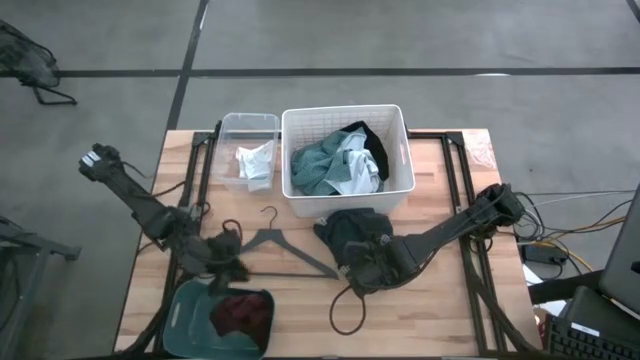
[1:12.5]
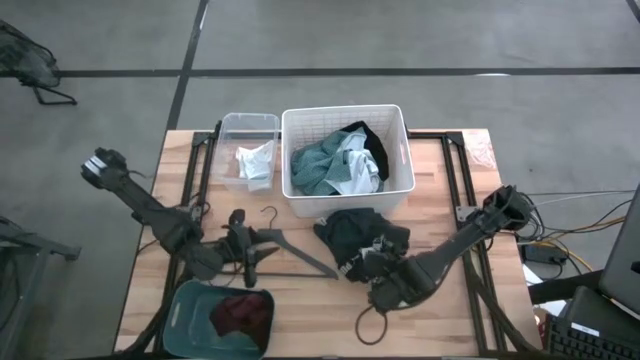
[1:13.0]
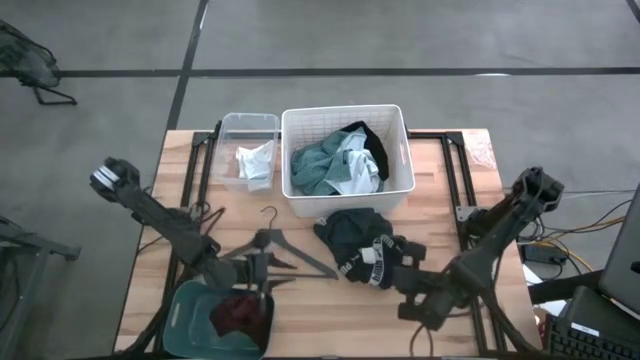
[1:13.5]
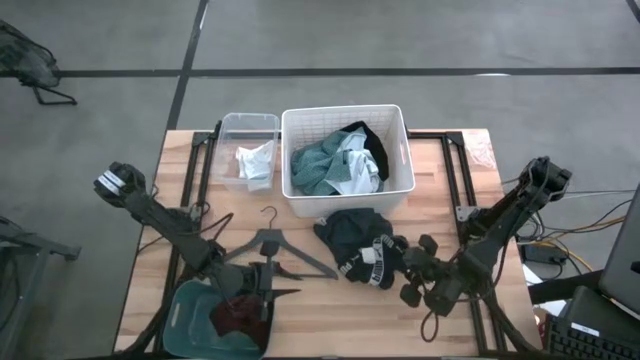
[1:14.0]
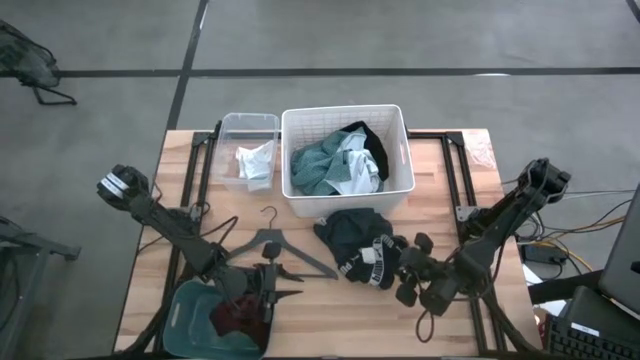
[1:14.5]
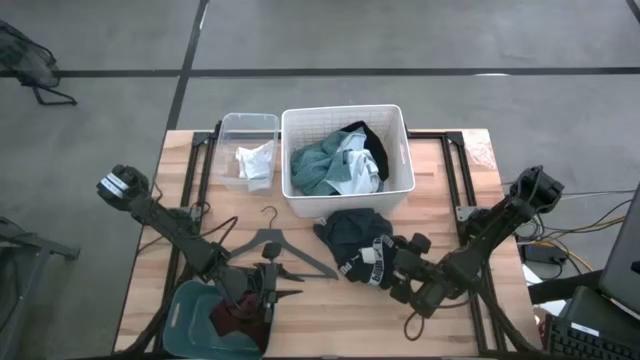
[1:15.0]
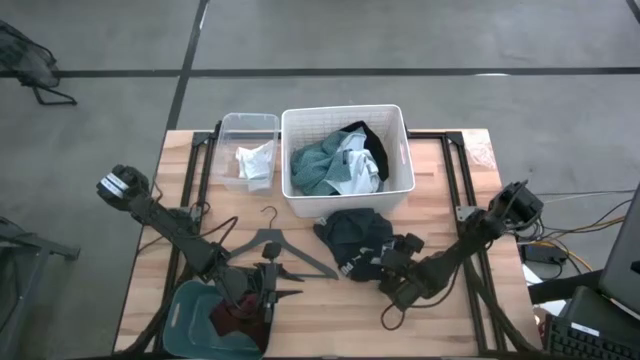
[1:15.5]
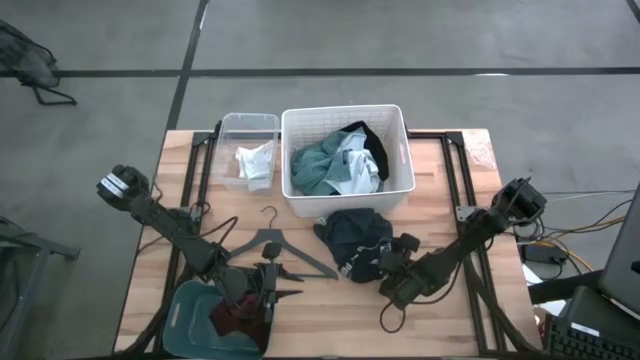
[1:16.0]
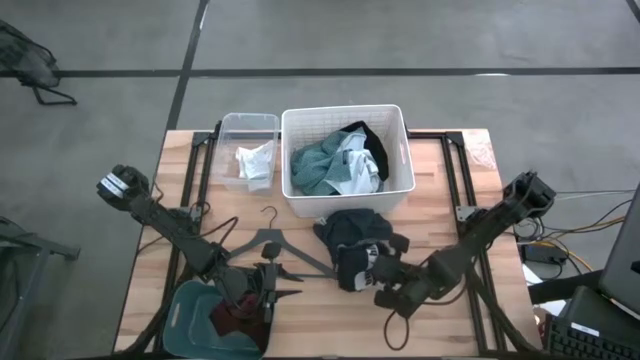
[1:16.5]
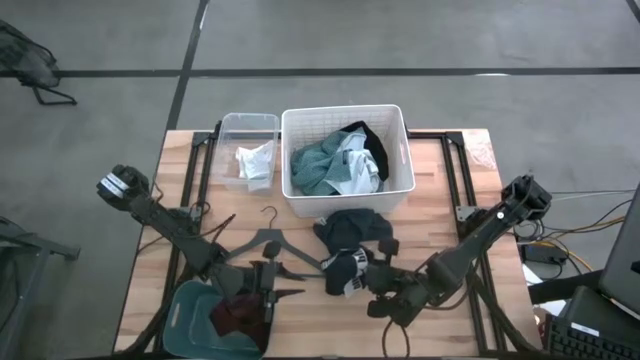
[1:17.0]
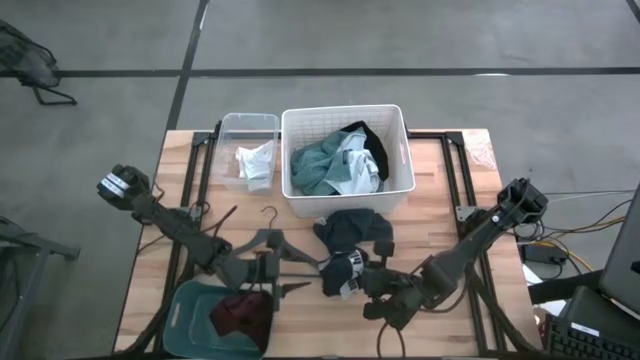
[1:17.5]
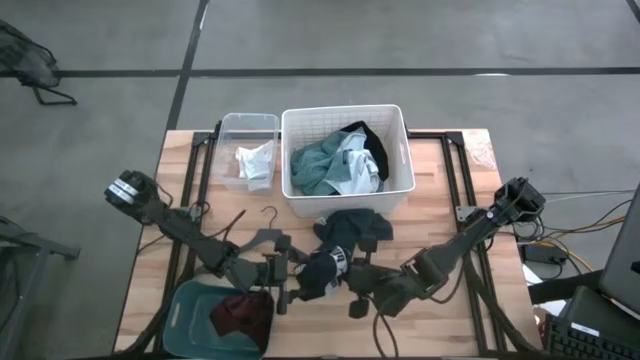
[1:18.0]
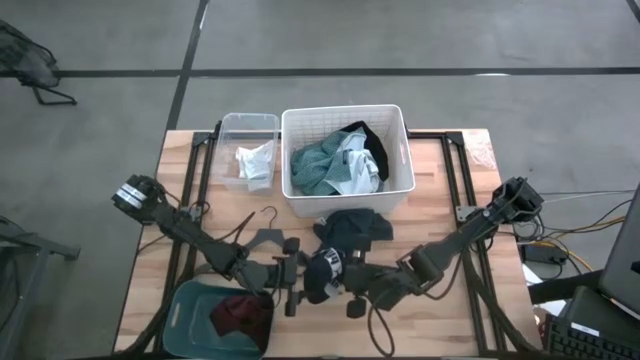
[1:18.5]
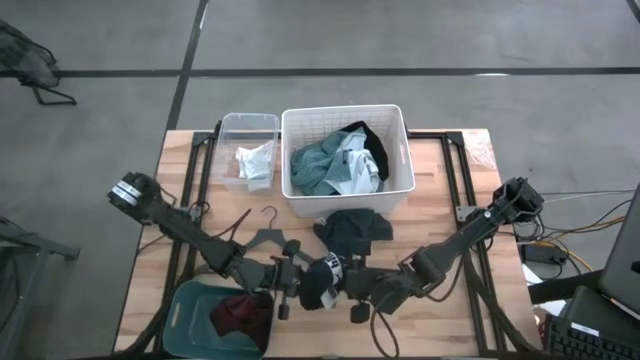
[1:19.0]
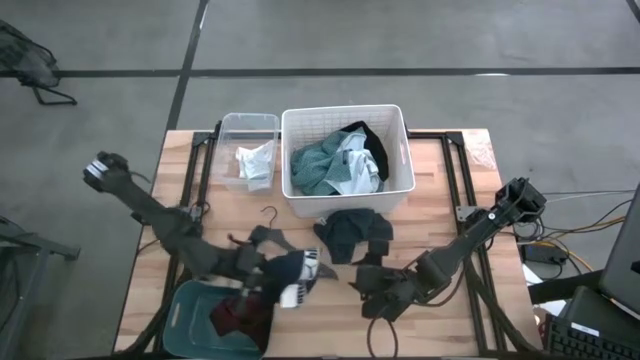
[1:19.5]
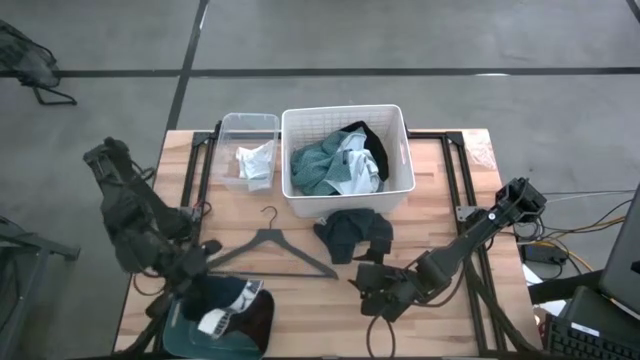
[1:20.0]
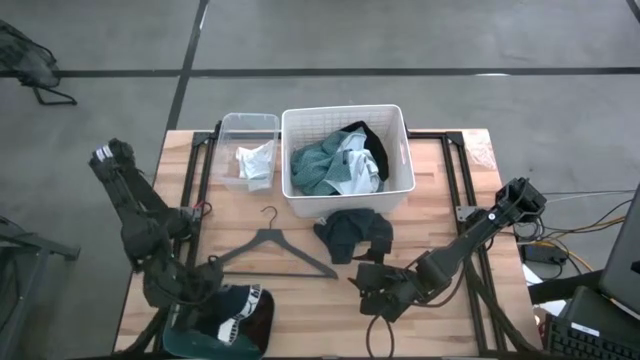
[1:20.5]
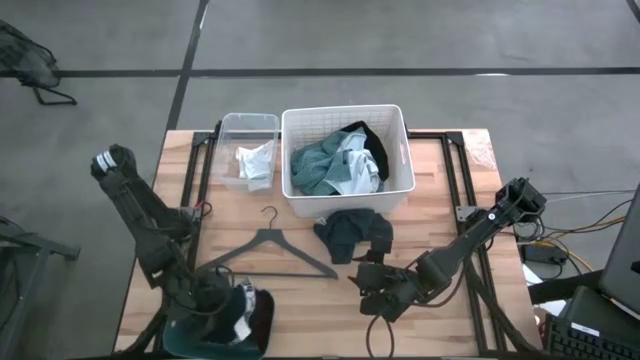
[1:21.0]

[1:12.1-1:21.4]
Task: Pick & Place Cloths
Put the black boxers into the gray bin

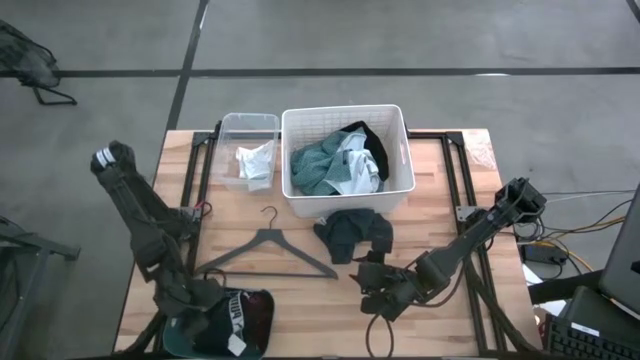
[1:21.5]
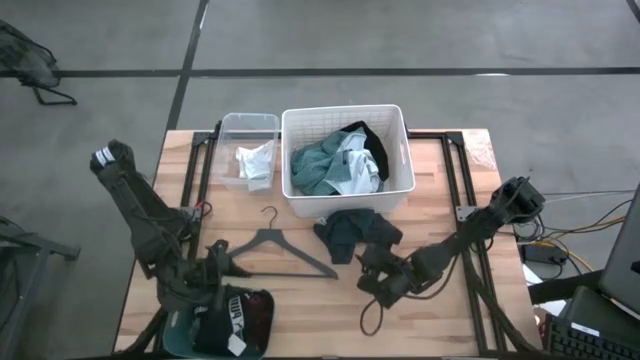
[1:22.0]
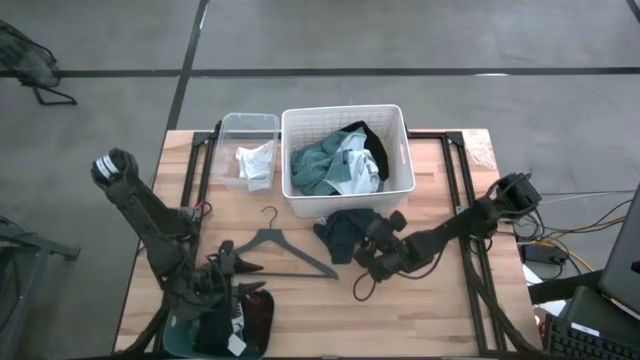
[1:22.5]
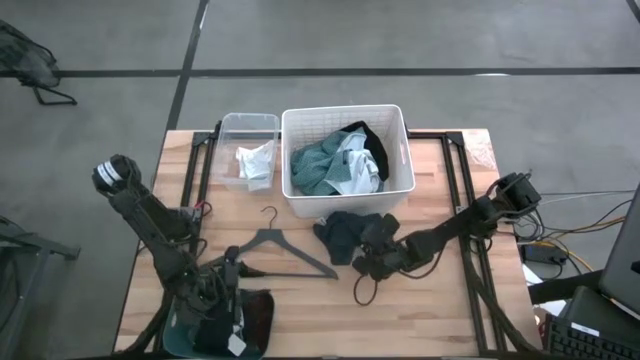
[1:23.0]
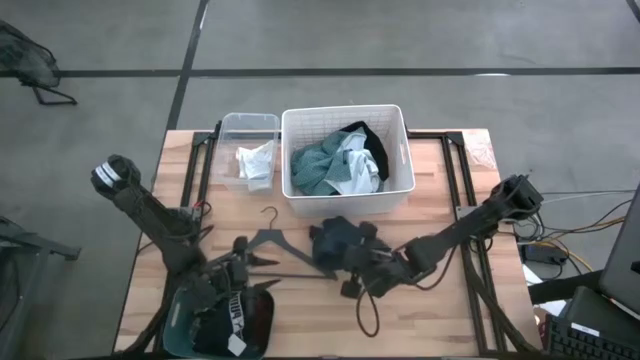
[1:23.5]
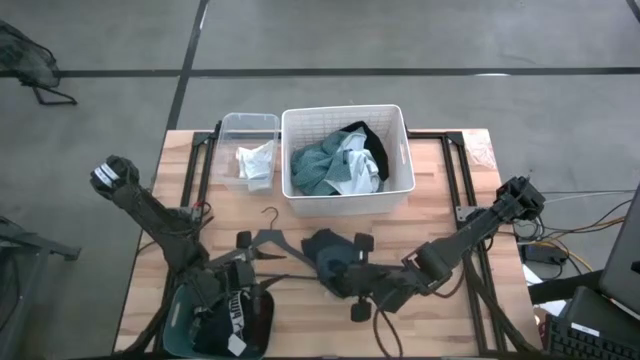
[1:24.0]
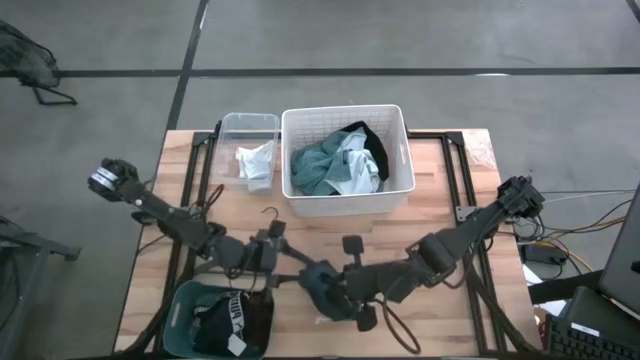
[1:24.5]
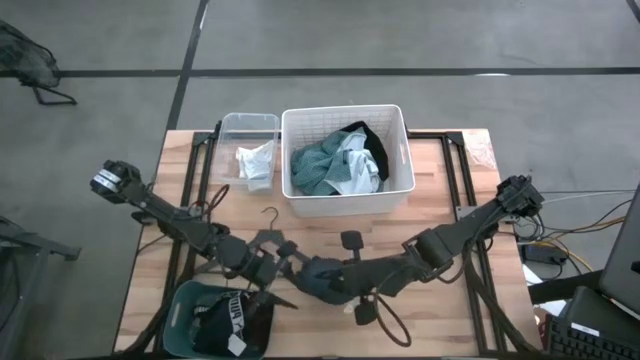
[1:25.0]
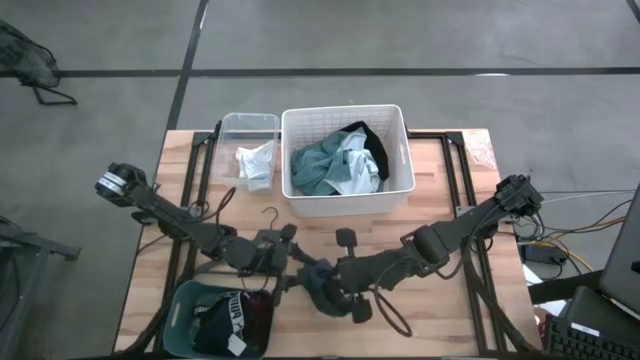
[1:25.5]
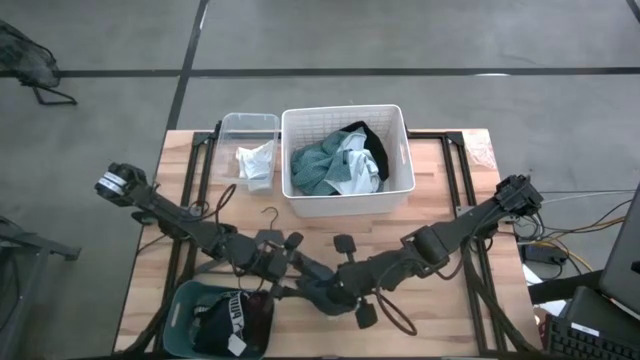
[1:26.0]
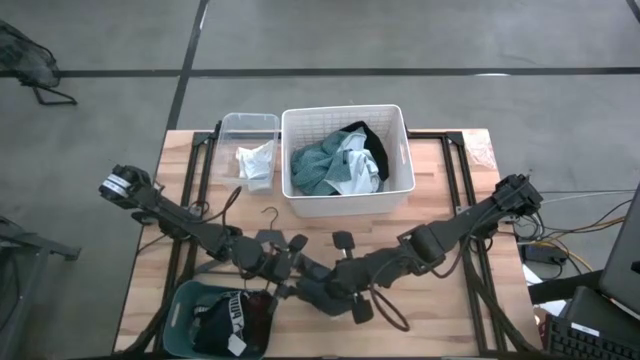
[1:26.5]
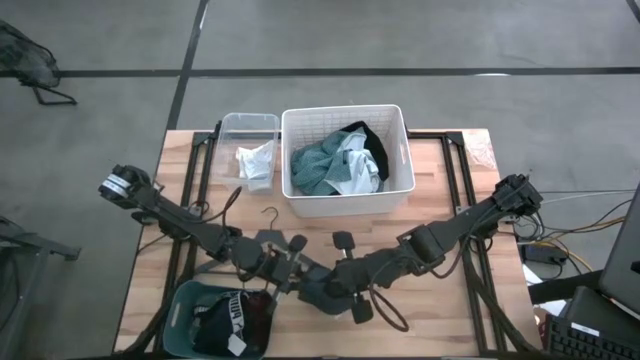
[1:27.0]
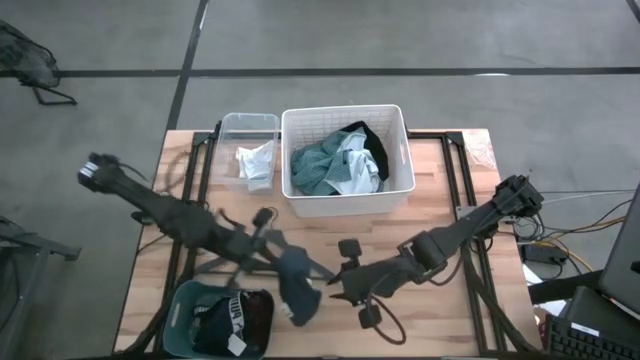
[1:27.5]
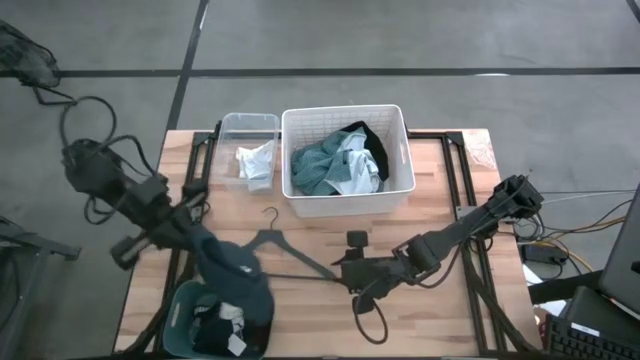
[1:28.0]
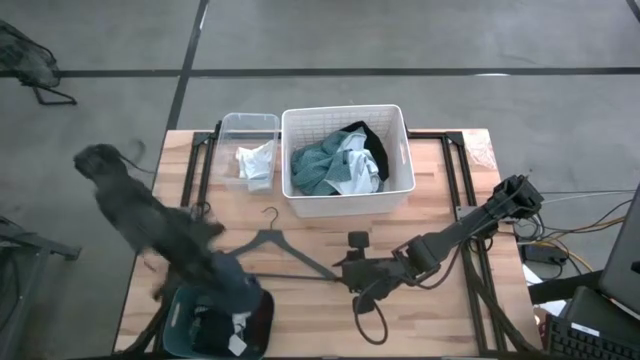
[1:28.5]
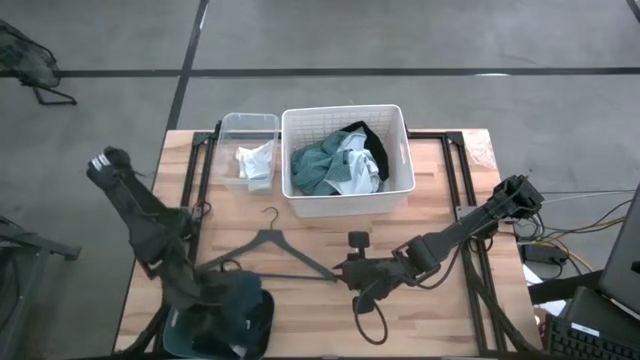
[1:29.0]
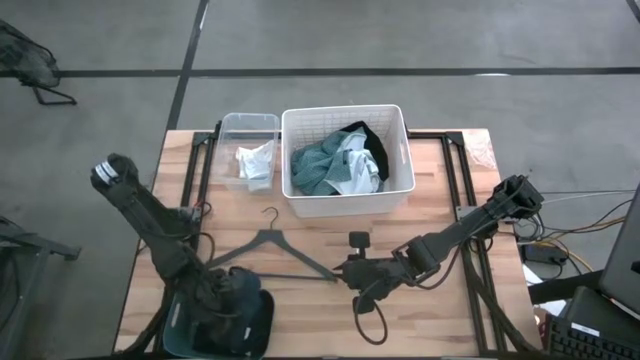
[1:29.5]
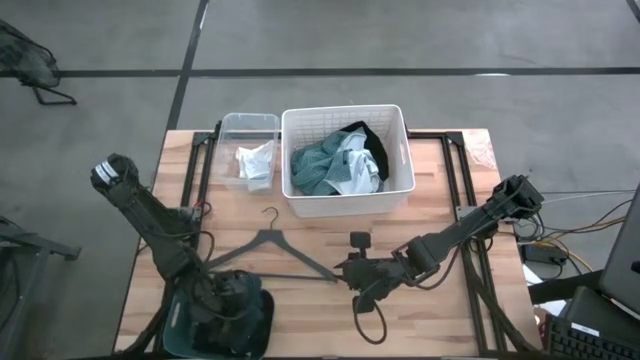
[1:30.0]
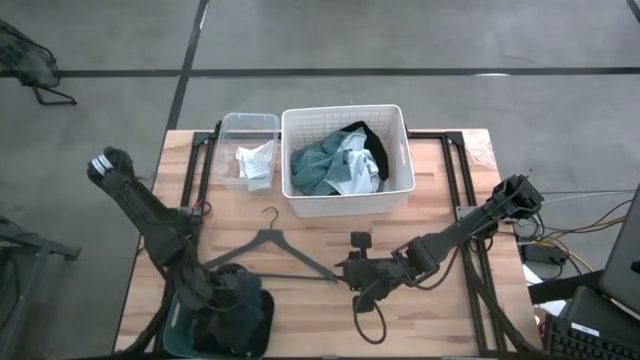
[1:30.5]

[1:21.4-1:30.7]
Put the gray shorts into the gray bin

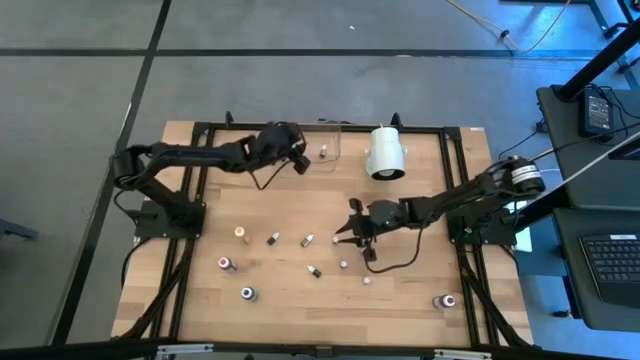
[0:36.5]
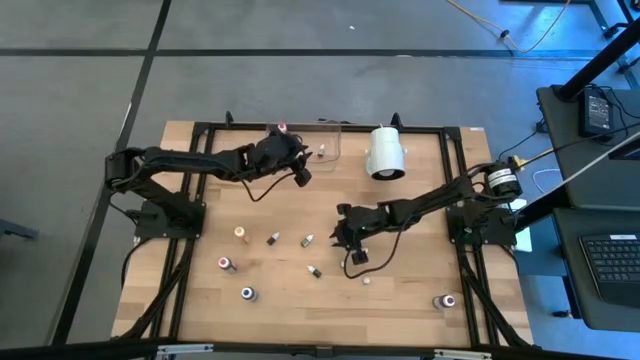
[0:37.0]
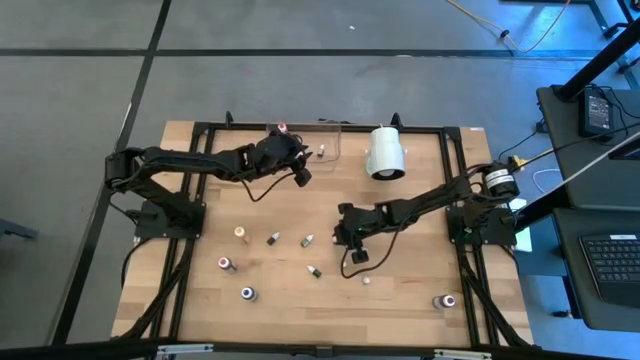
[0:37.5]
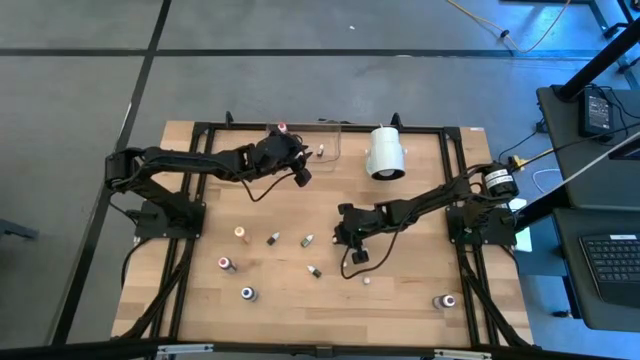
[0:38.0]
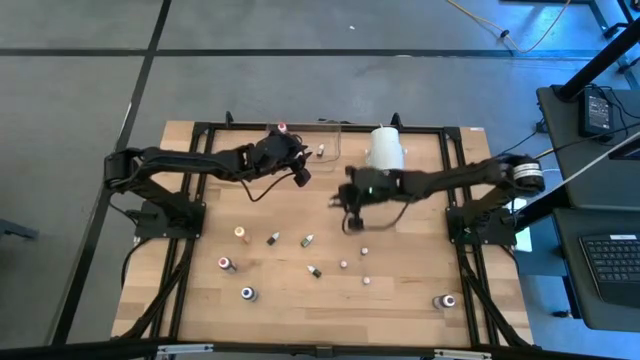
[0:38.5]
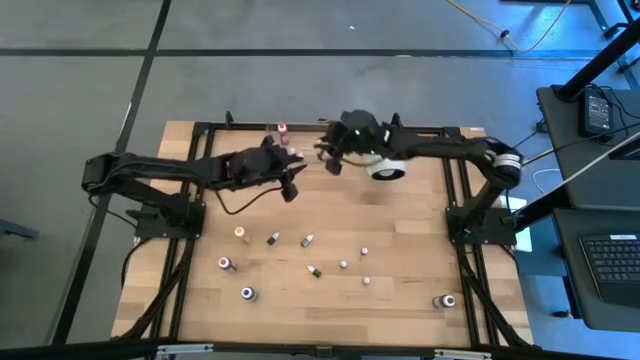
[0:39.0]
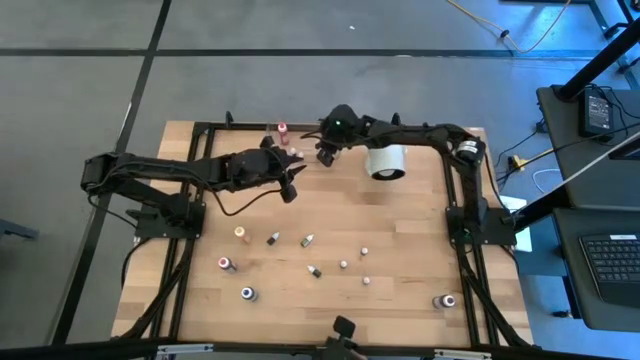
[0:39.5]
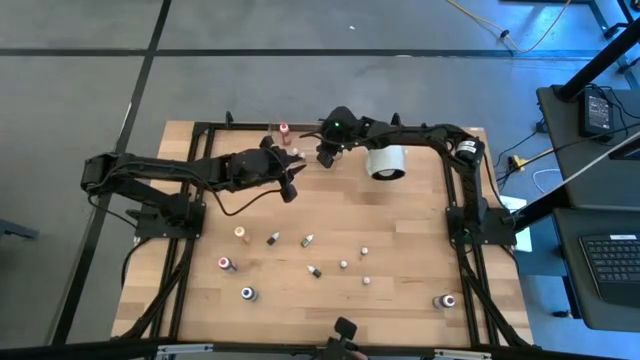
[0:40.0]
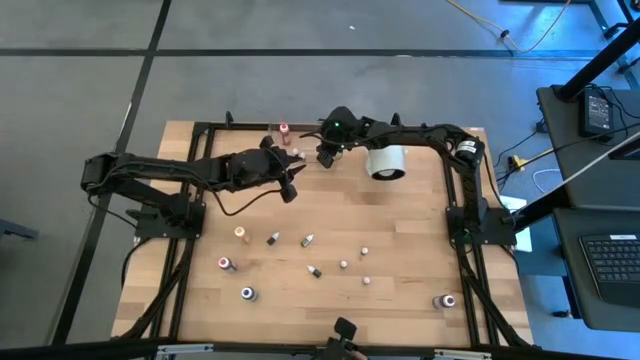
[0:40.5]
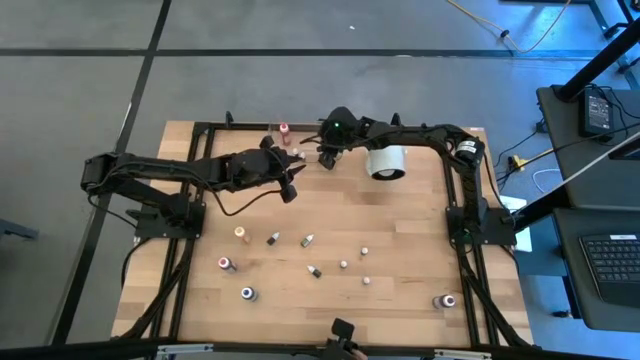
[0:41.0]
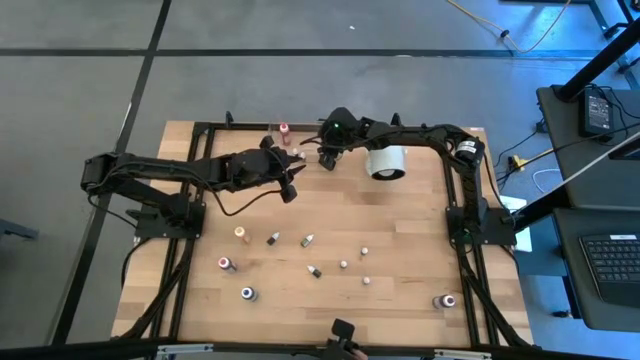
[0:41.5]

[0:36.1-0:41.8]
Task: Pick & Place food coloring
Put the blue food coloring bottle into the transparent bin
